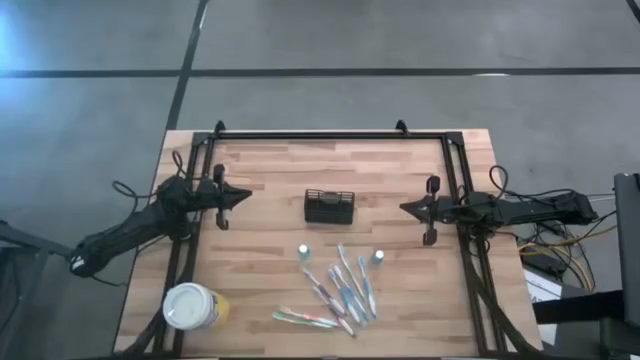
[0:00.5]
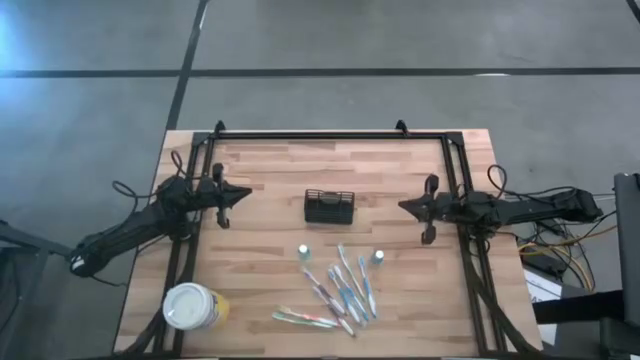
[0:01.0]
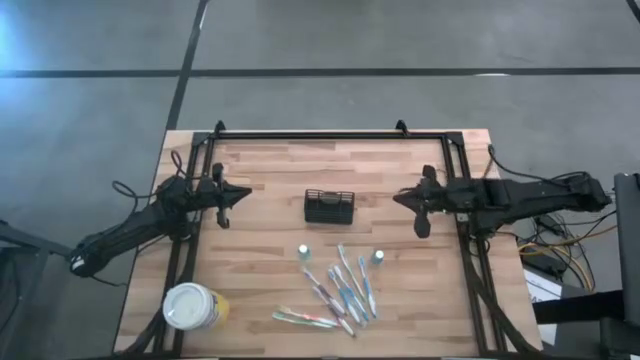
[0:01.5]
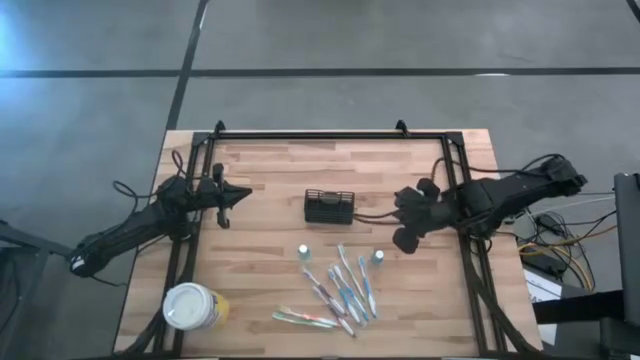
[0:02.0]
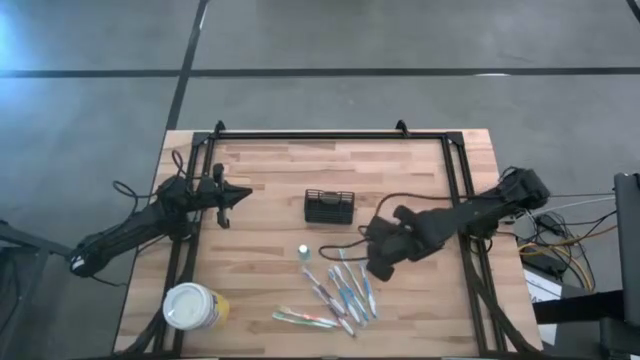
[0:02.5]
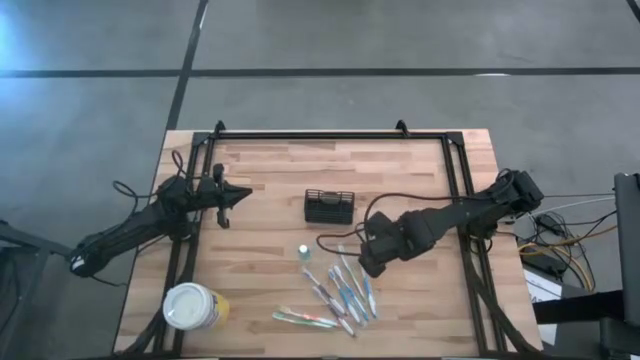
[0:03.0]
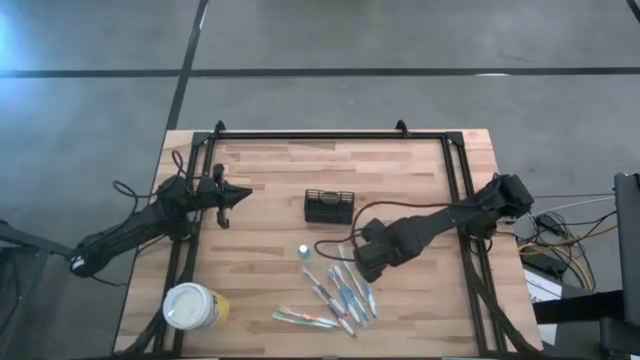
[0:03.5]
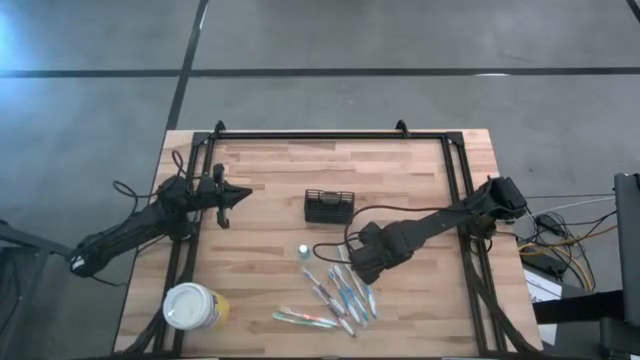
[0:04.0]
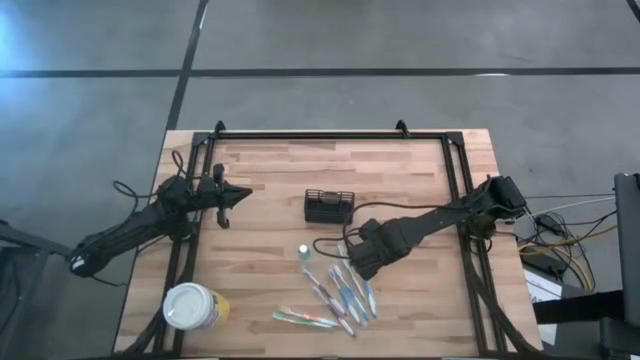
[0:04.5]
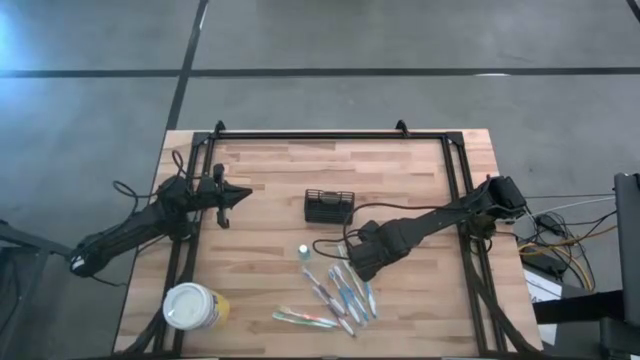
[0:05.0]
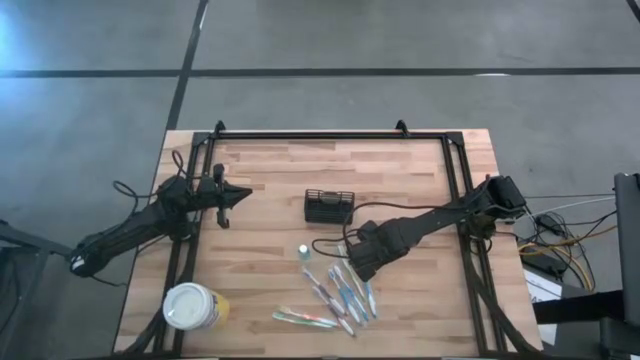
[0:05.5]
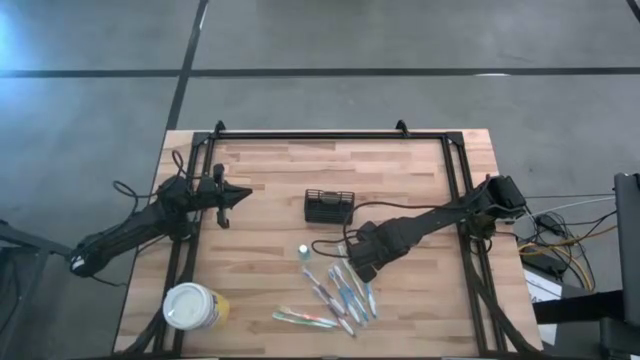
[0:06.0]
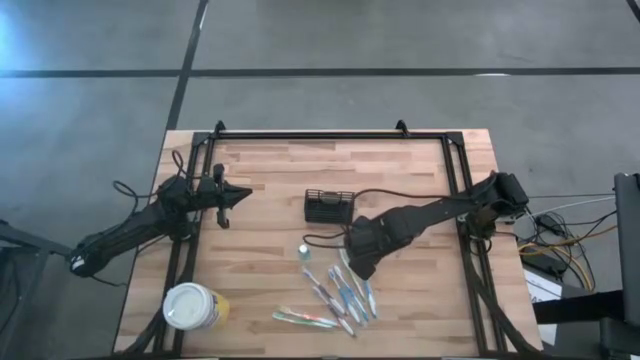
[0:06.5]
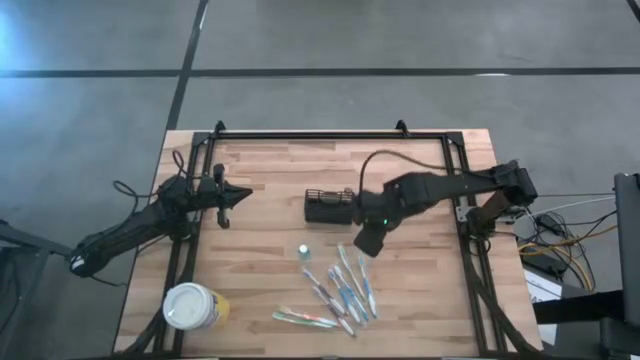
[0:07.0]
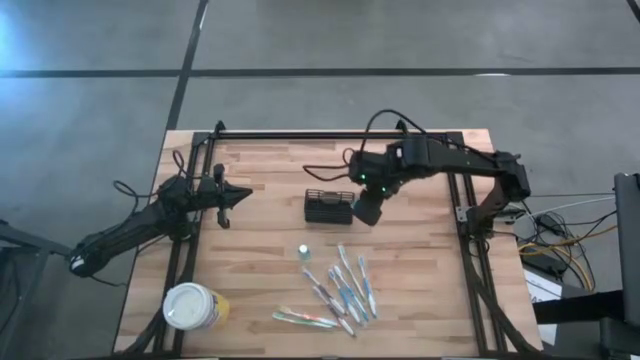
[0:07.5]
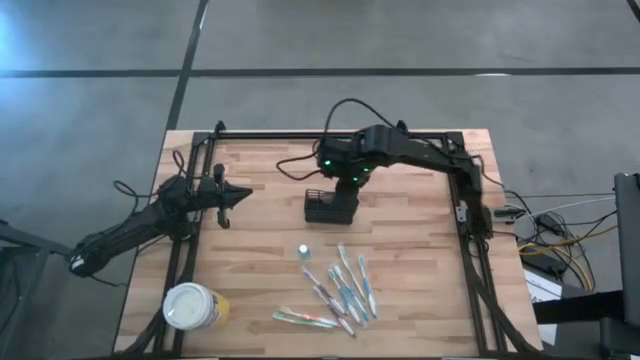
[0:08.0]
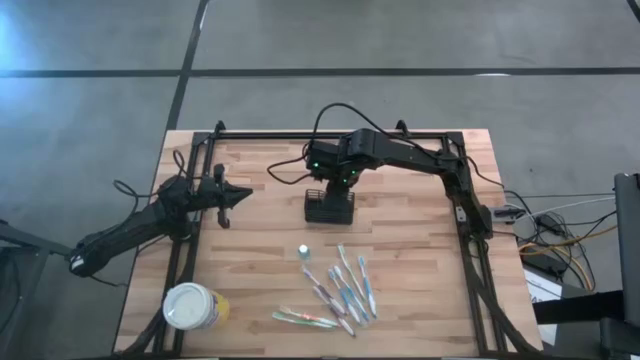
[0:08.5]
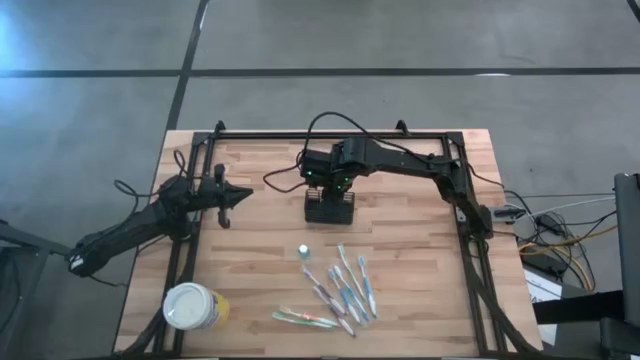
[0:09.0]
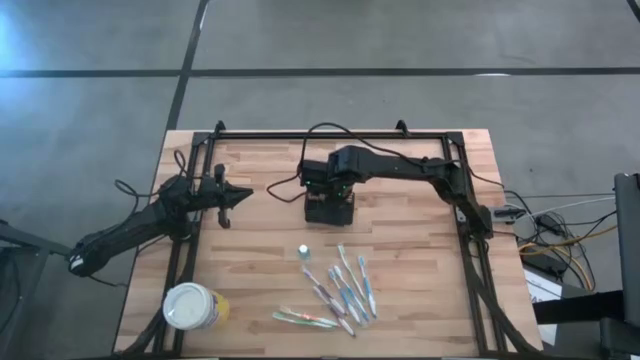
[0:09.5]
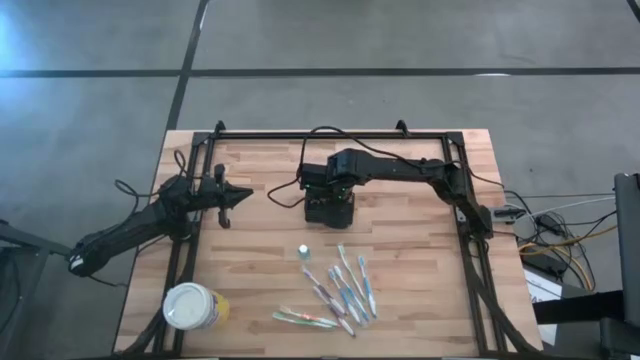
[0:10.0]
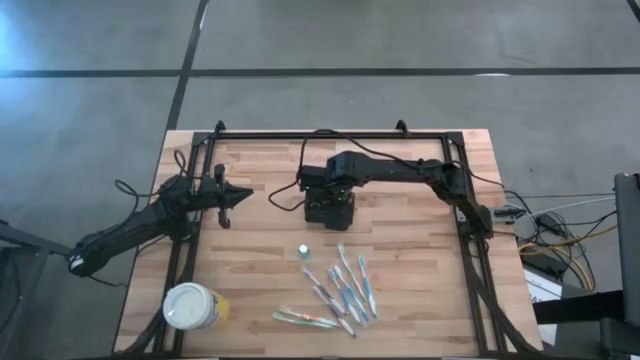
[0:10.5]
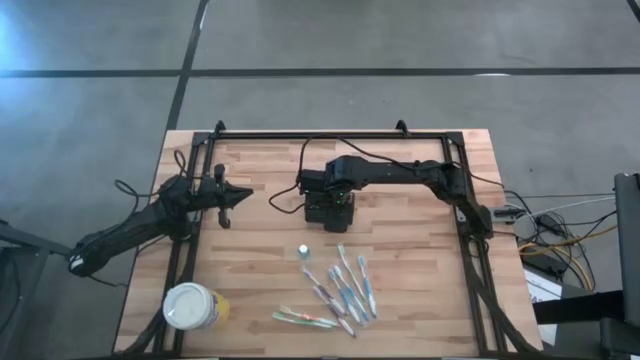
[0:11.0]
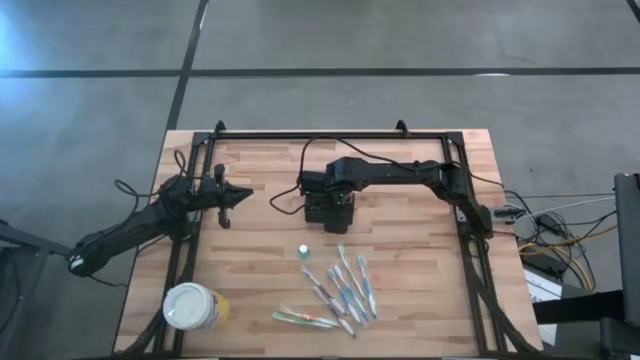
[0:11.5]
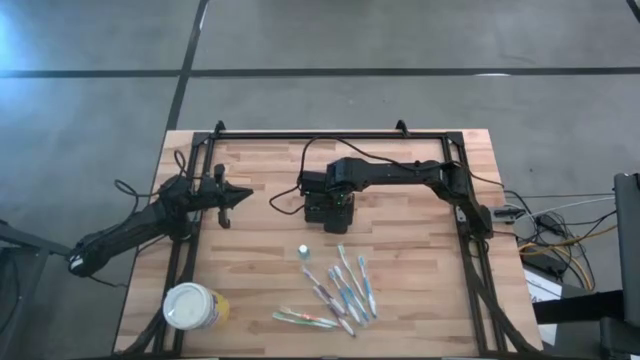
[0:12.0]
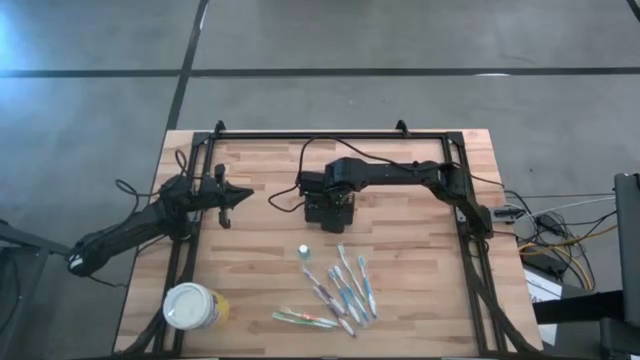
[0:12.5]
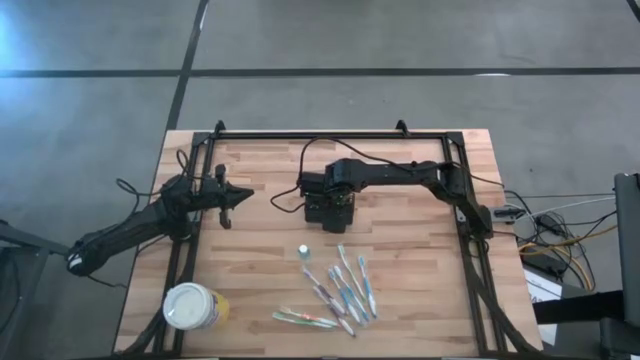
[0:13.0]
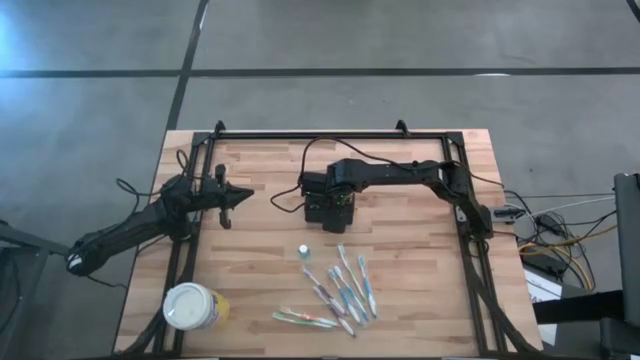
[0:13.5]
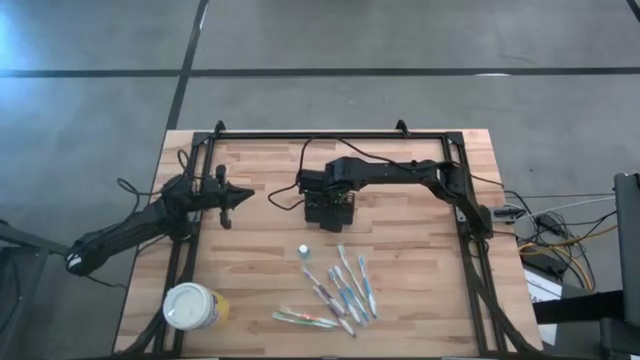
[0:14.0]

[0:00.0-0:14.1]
Task: Pick & Place toothbrushing station
Put the blue mouthwash into the wire organizer
